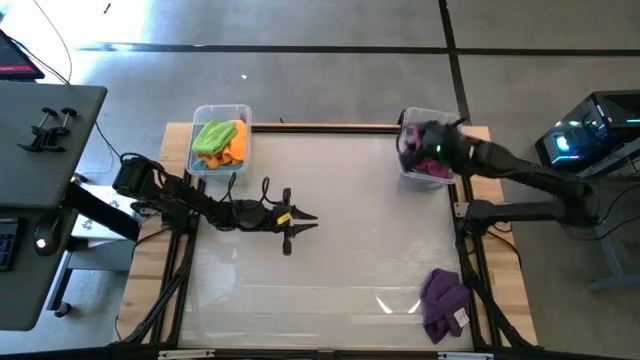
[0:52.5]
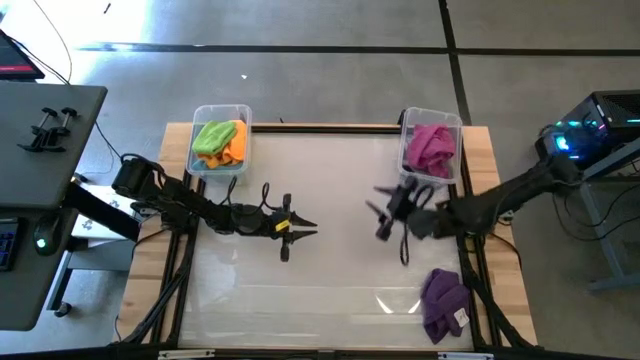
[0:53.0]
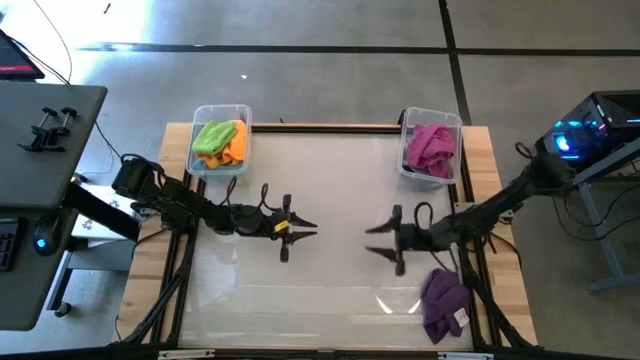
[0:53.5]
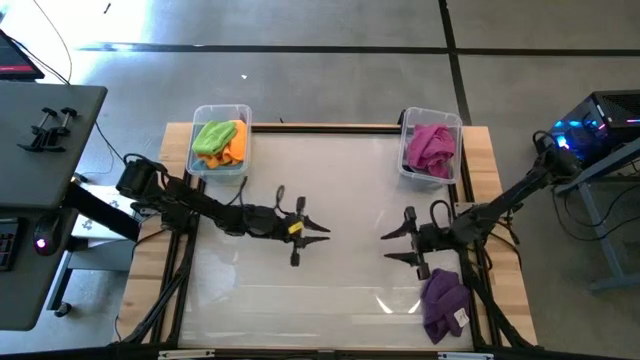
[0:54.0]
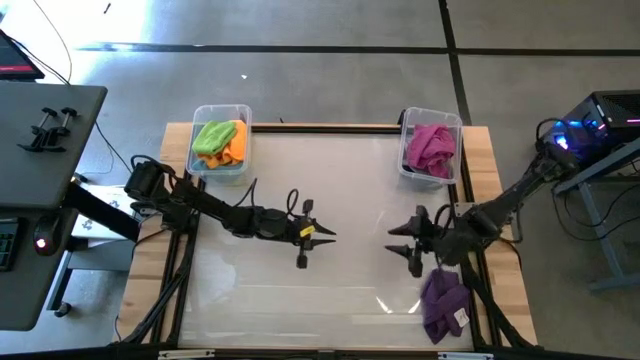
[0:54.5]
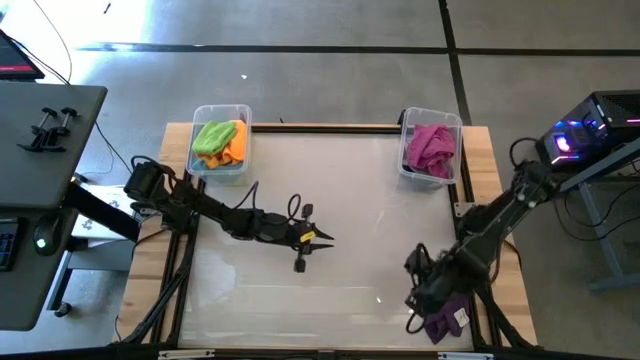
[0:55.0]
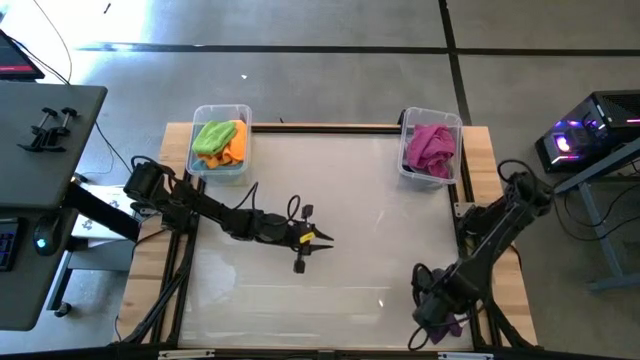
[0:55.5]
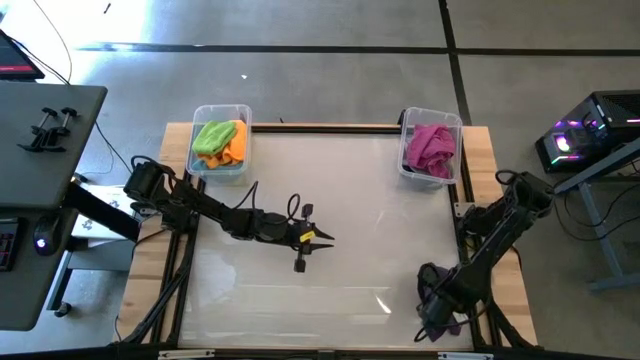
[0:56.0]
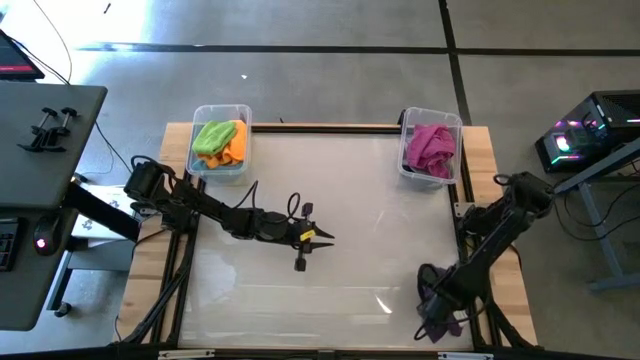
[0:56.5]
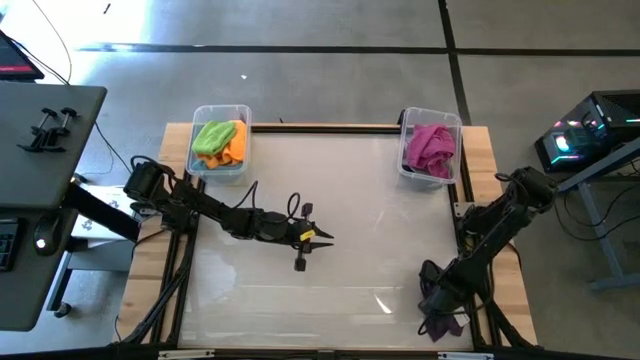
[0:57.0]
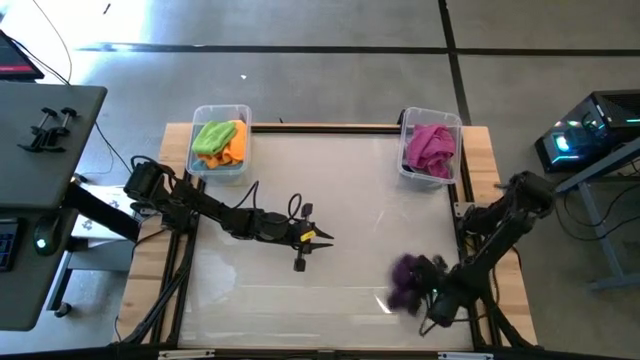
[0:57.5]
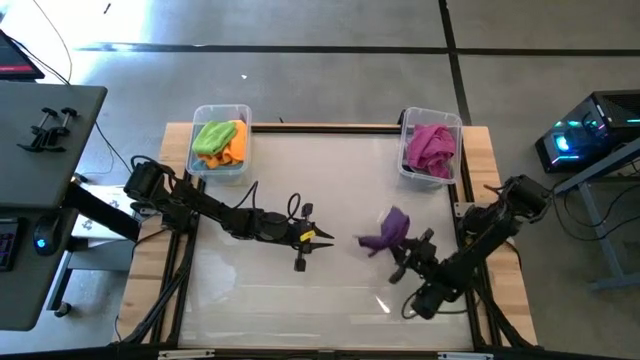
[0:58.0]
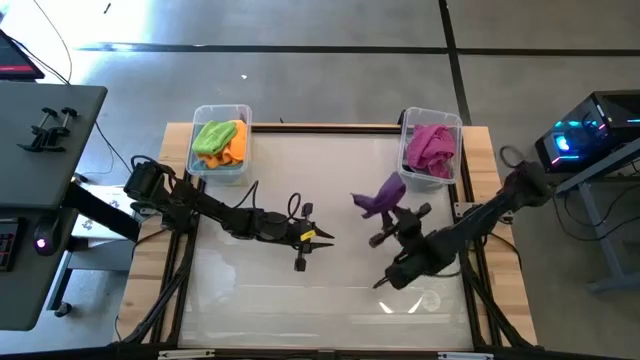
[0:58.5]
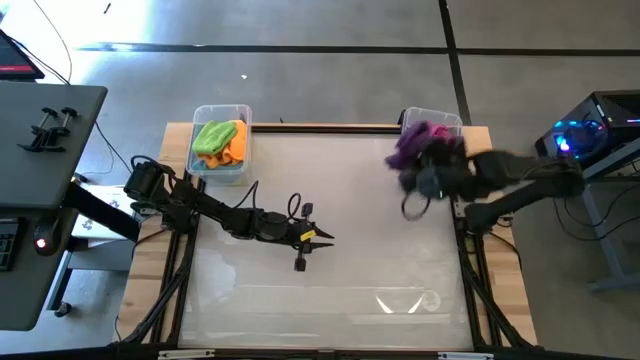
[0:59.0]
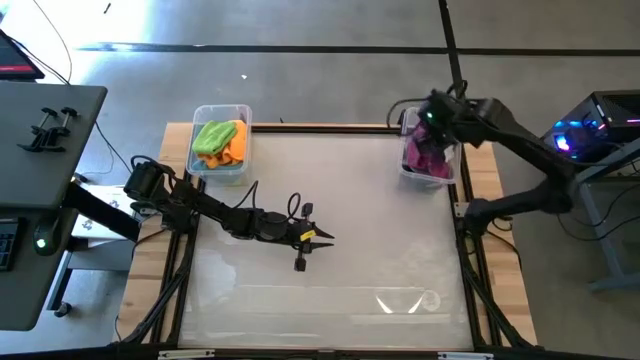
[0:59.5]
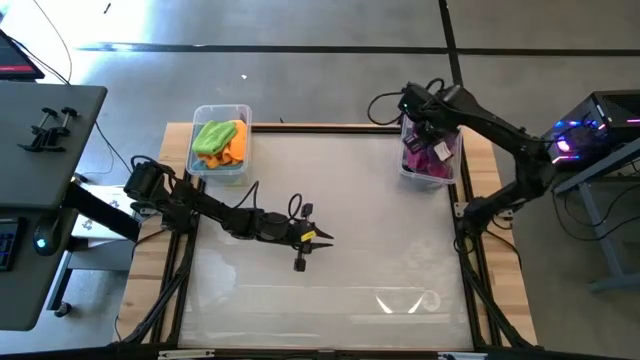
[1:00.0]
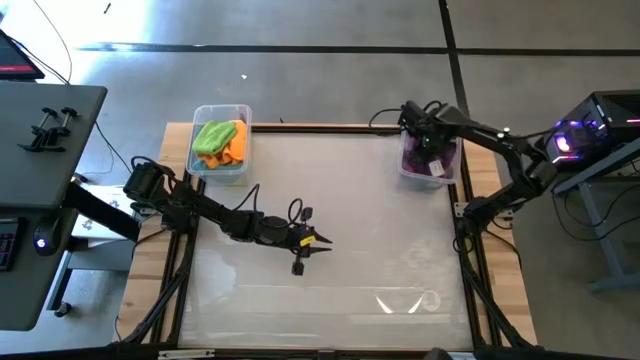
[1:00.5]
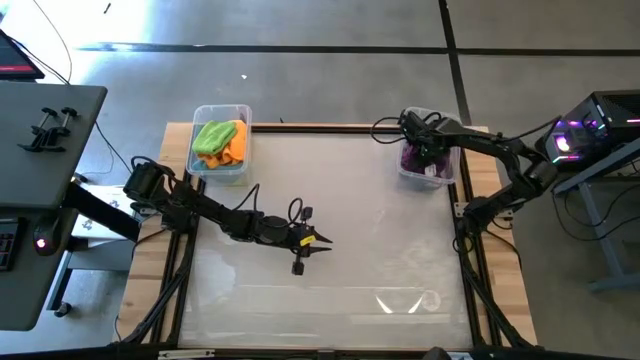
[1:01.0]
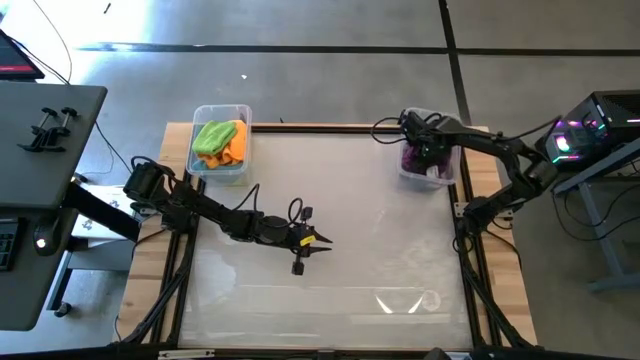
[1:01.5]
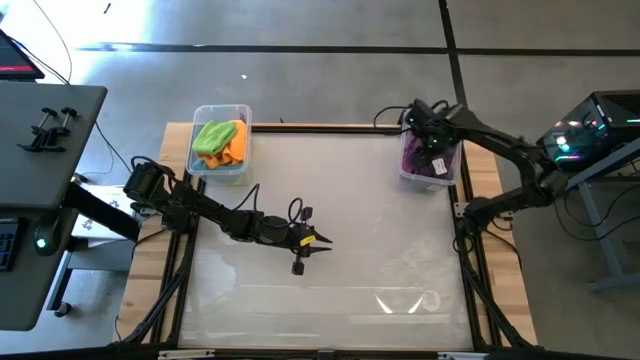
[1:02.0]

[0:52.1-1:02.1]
Task: Sort towels by color in basket
Put the violet towel into the right transparent bin

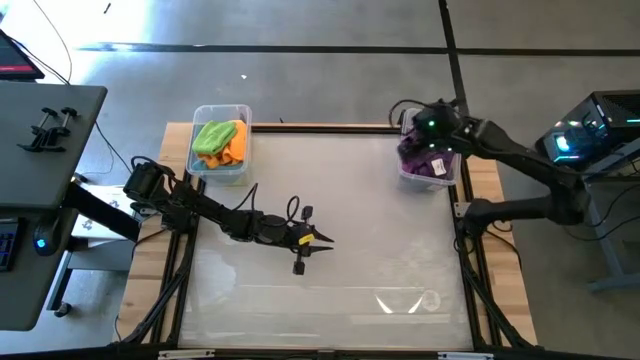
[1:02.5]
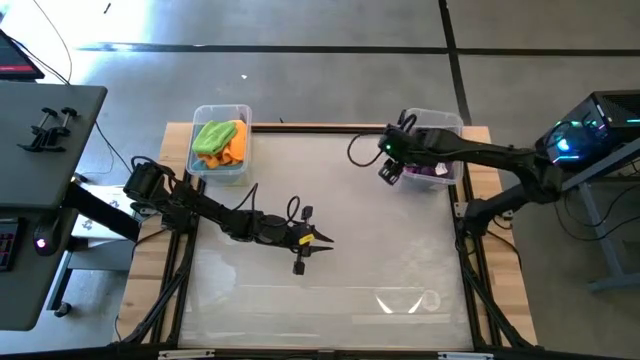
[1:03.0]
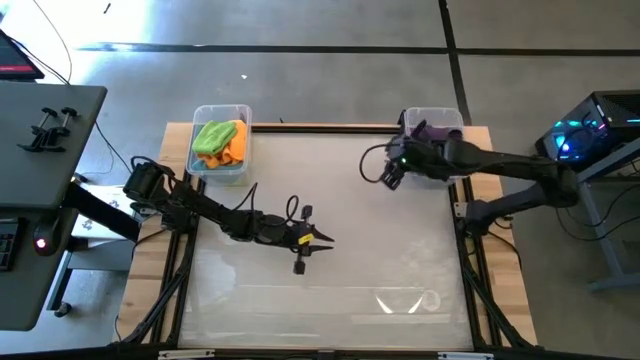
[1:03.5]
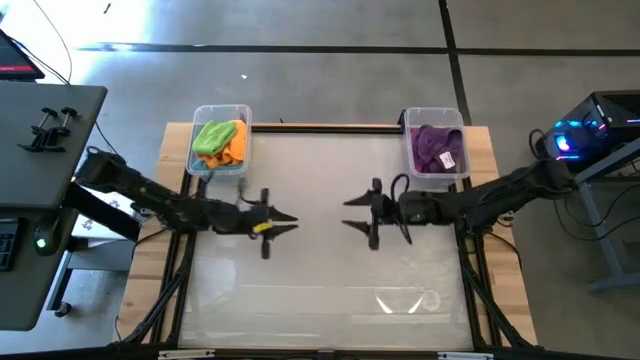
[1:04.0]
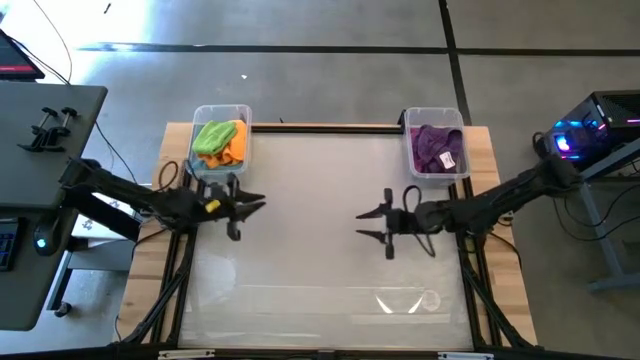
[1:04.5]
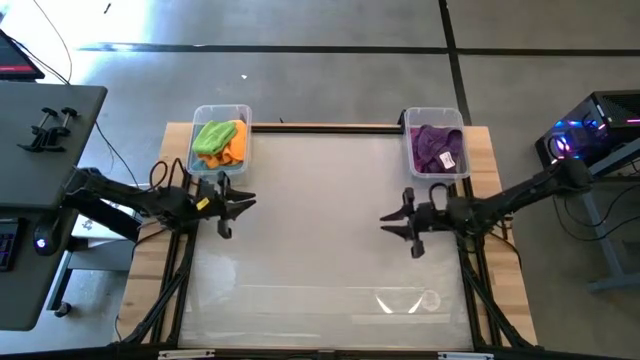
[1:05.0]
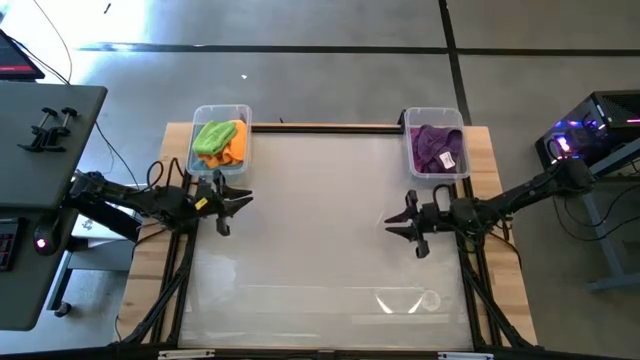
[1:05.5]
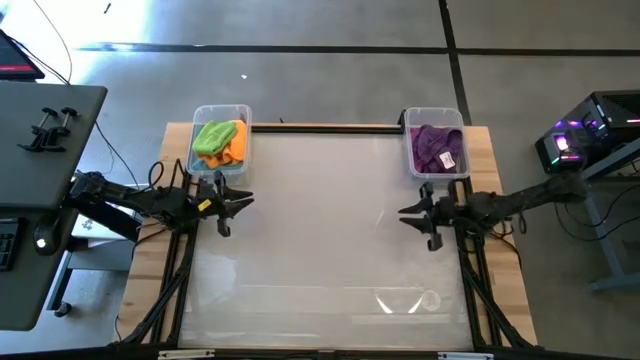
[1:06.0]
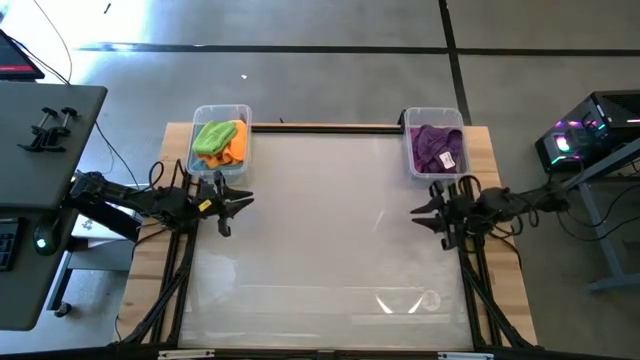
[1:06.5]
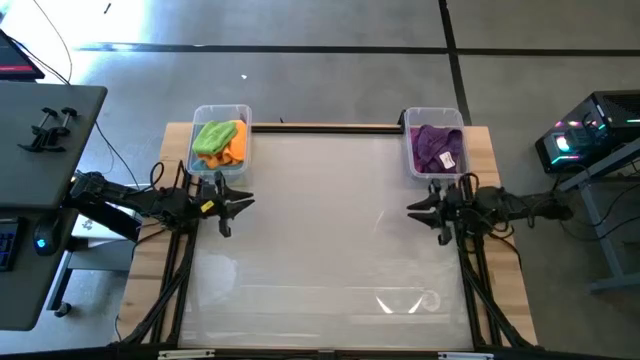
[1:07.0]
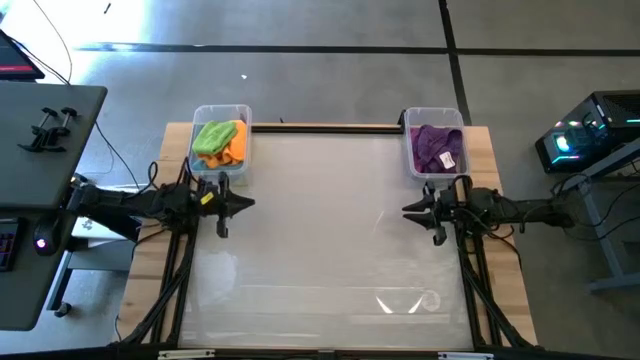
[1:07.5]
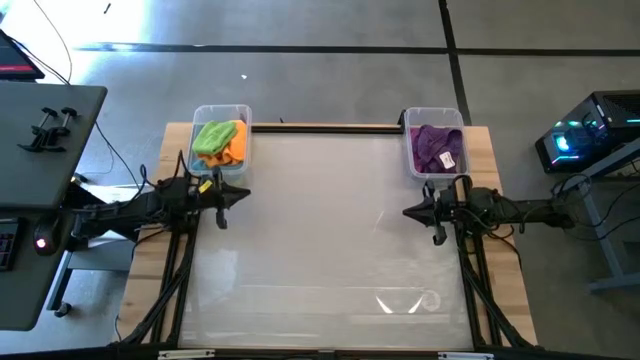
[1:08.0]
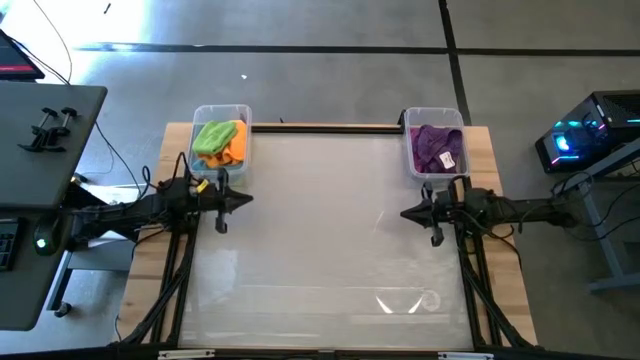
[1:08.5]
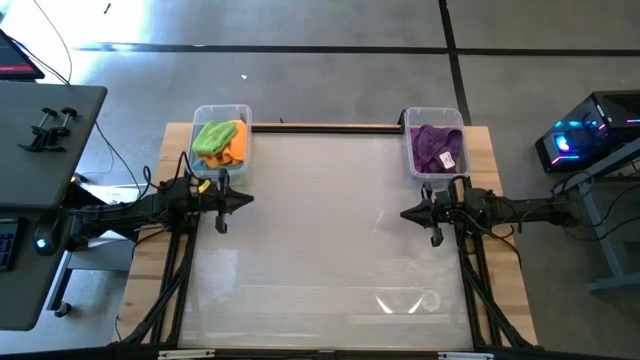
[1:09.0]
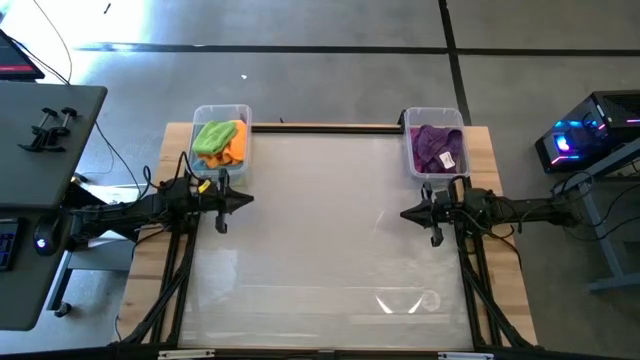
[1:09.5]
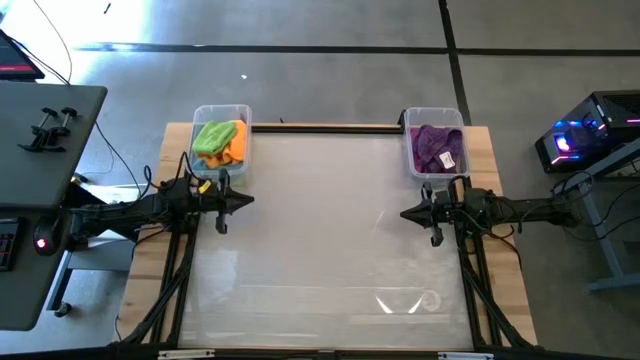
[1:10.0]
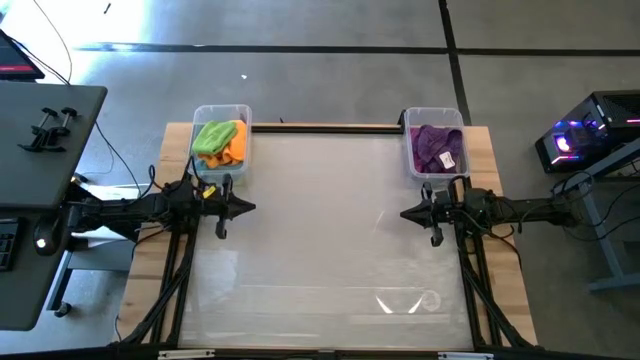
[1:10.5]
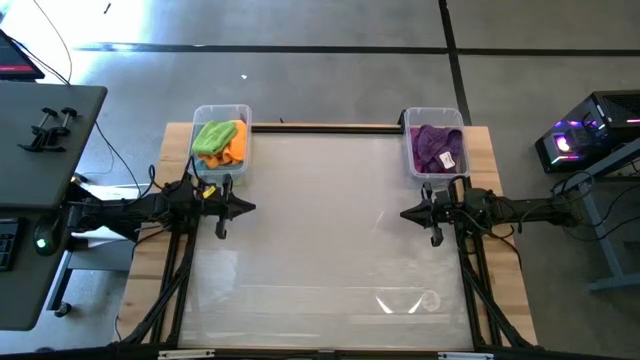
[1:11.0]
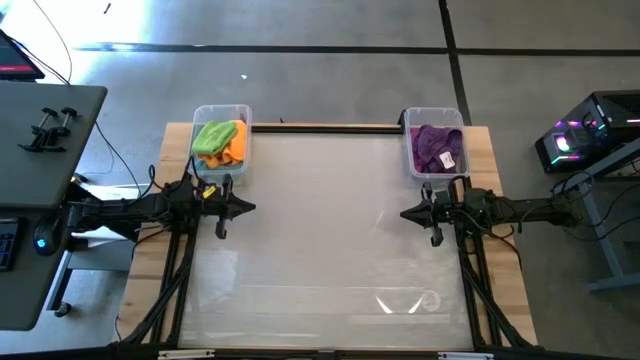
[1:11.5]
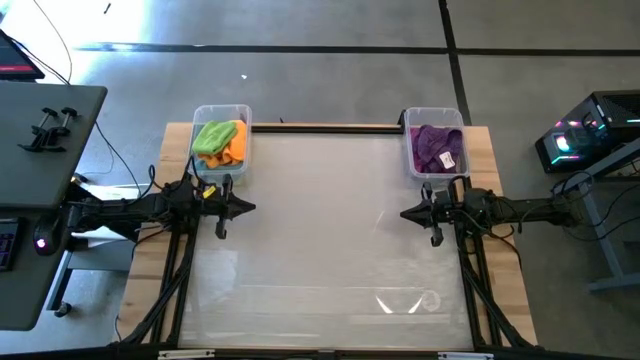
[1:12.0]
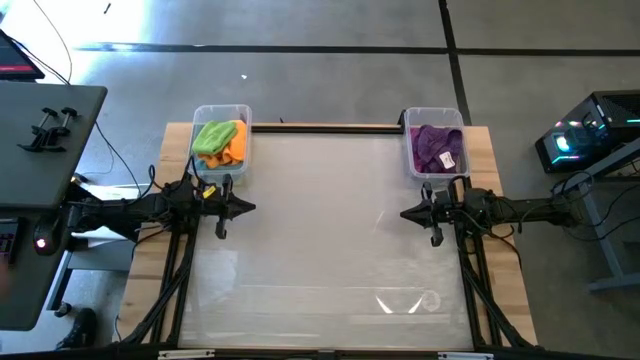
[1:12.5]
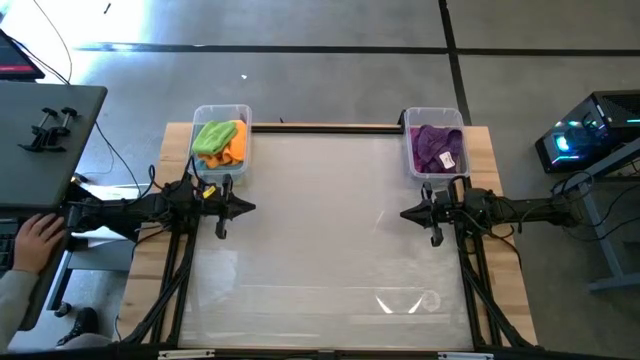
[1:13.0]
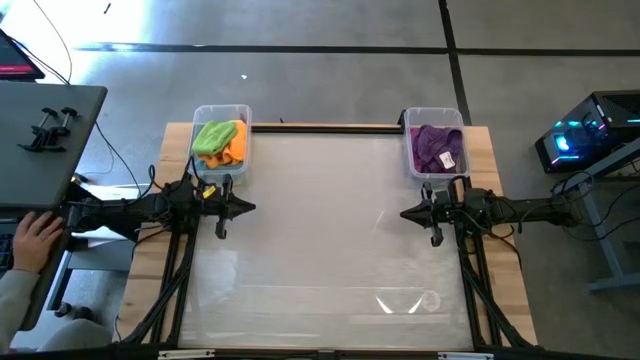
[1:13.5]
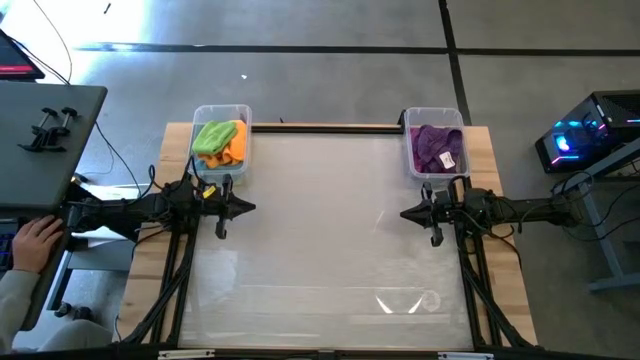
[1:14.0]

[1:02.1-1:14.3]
Return to Home Position
